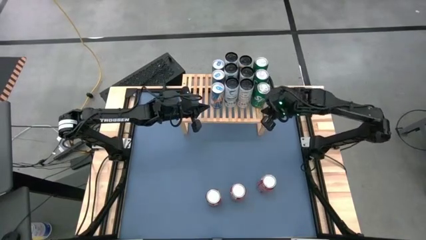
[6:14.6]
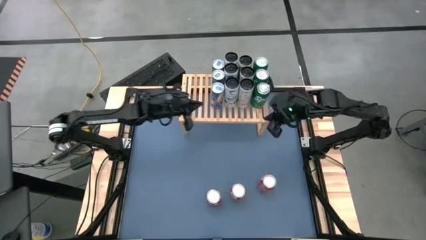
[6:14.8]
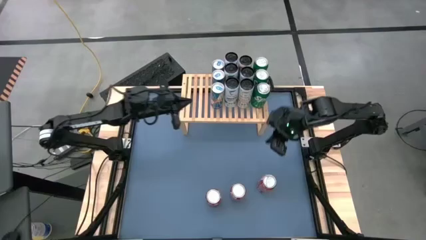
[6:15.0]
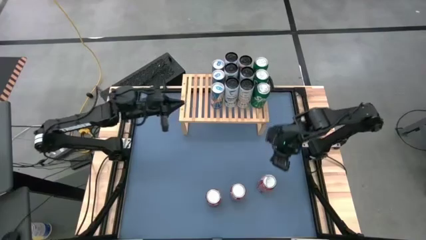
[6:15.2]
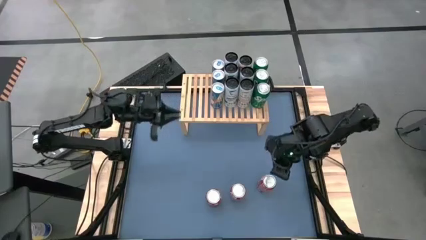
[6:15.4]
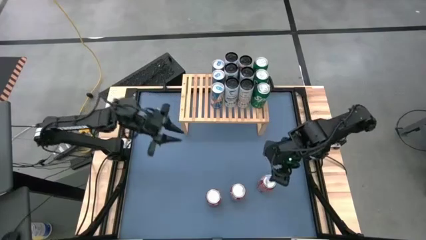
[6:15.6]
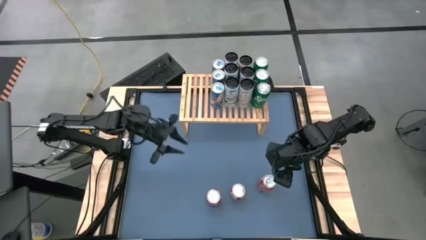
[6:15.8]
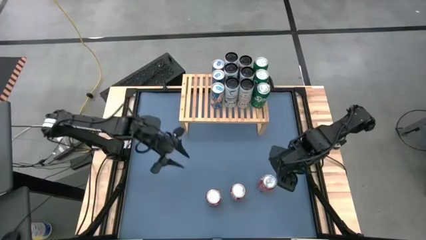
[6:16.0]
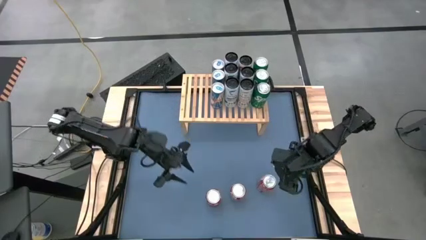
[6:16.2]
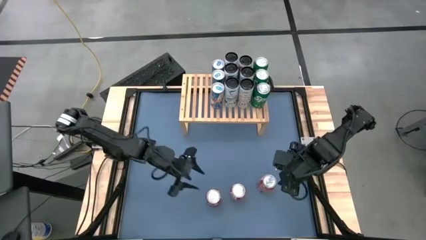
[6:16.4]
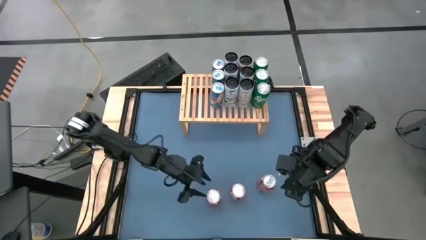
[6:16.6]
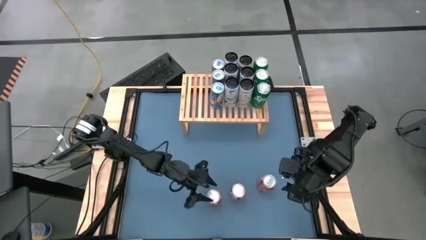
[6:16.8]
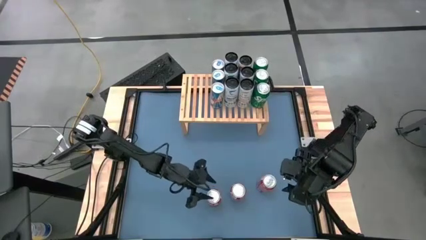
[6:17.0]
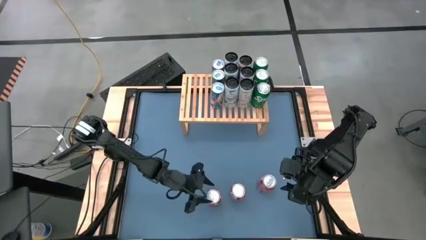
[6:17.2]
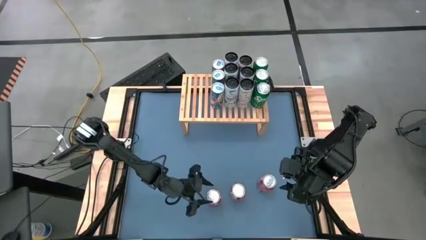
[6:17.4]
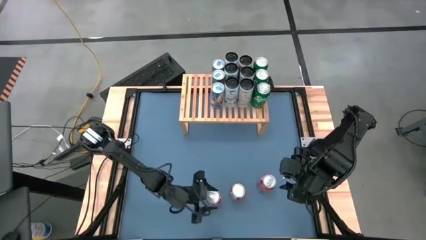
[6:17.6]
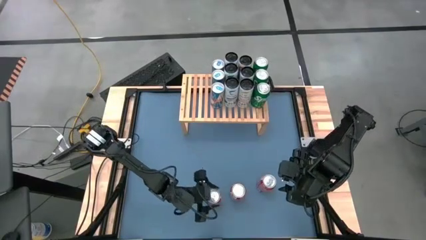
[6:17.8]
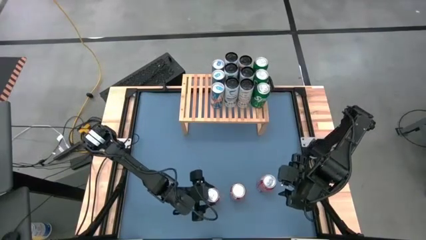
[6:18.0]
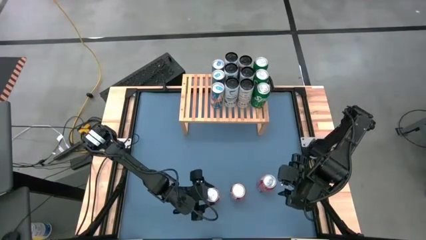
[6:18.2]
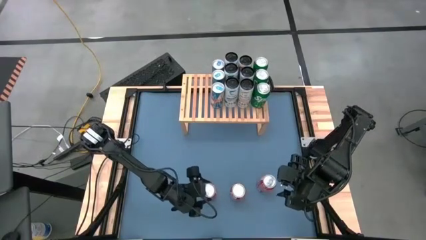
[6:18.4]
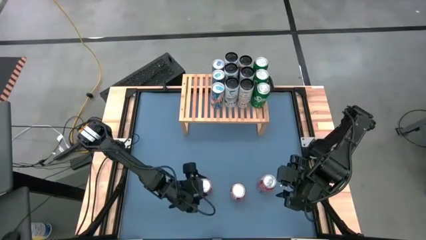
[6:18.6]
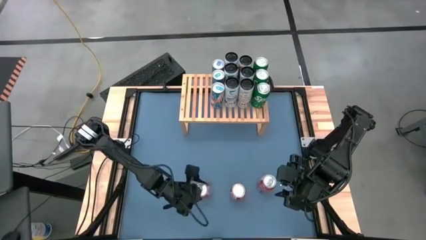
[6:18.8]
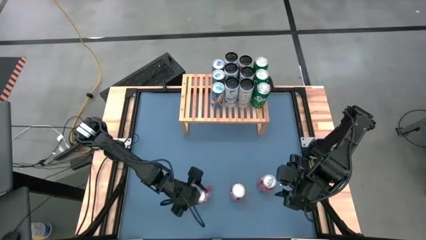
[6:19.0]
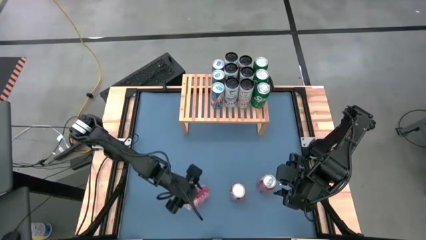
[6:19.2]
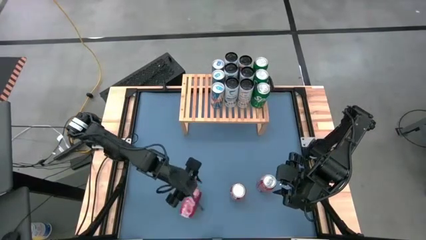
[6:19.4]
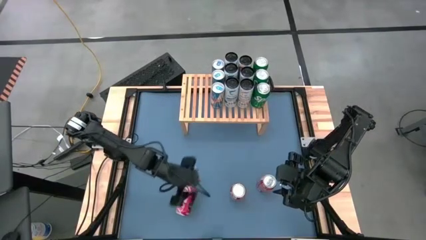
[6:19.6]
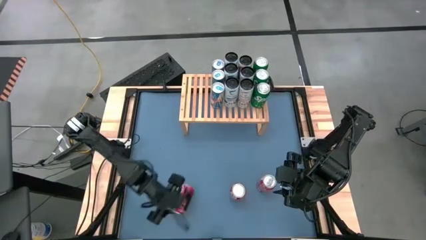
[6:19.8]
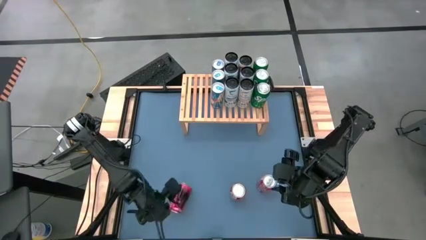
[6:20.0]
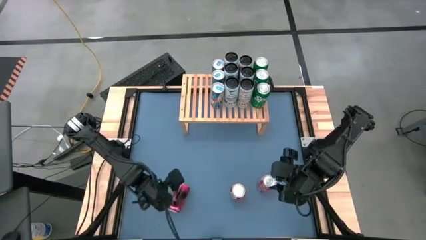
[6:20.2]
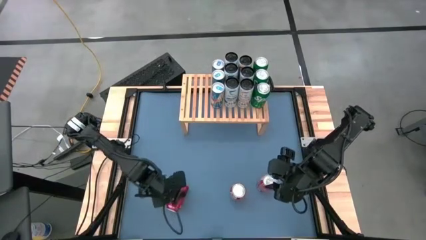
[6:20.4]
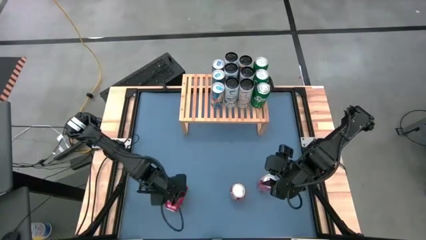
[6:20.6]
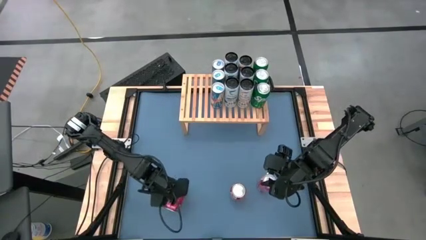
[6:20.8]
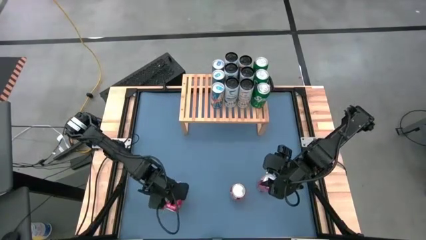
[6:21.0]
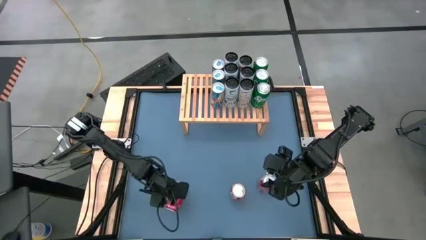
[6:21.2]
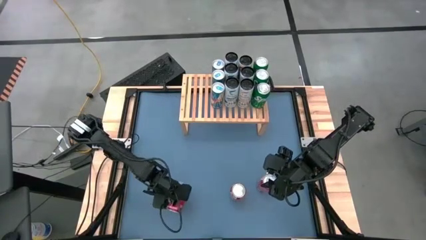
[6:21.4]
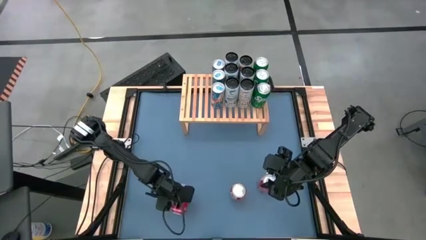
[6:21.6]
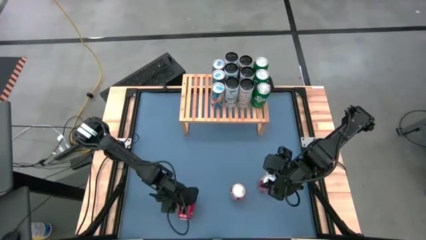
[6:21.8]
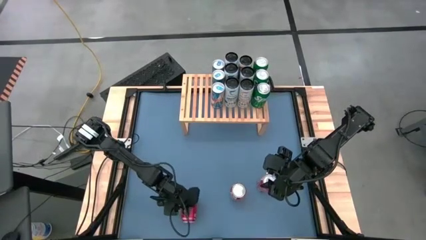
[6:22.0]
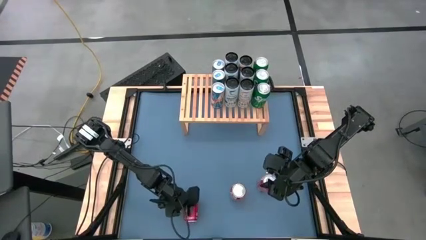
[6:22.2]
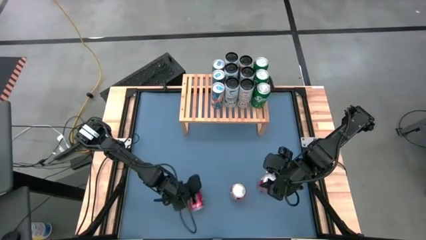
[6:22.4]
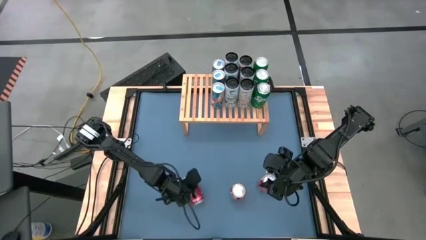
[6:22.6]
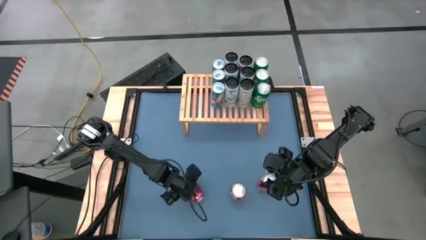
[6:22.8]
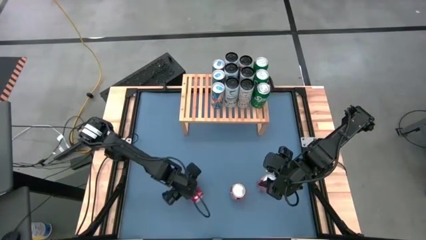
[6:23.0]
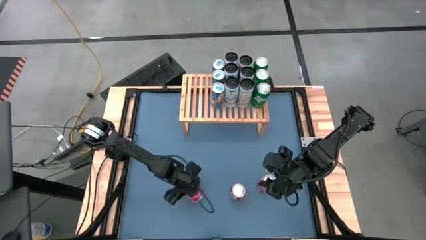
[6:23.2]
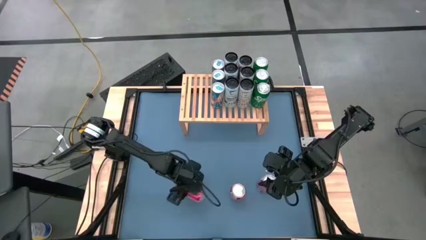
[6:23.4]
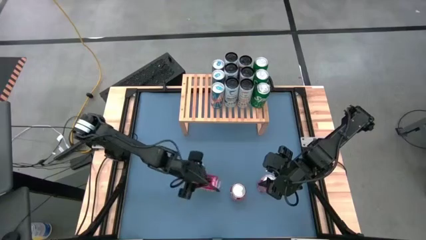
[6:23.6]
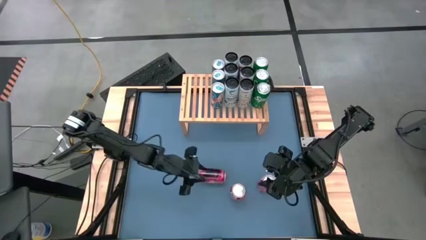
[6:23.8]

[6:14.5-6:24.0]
Task: Place canned beverage on shelf
Put the left red soda can on the shelf

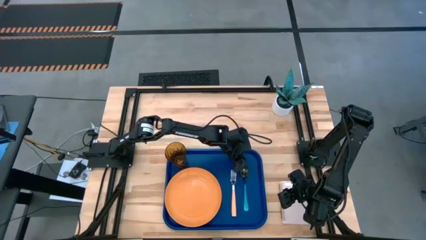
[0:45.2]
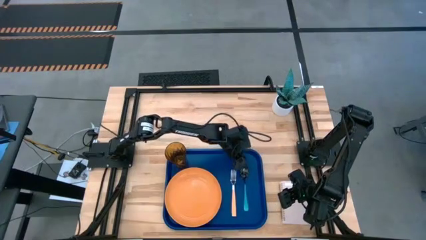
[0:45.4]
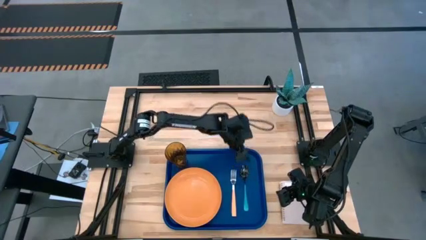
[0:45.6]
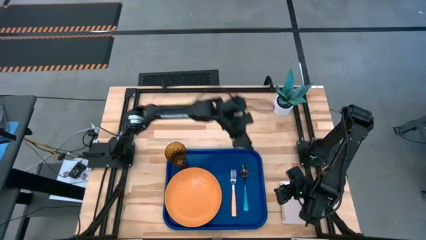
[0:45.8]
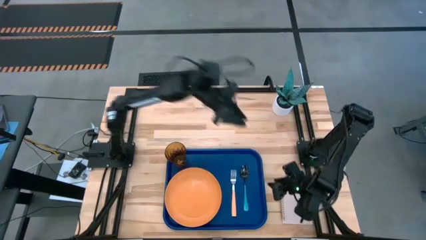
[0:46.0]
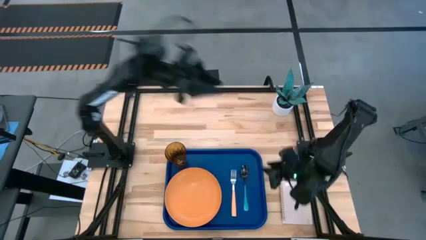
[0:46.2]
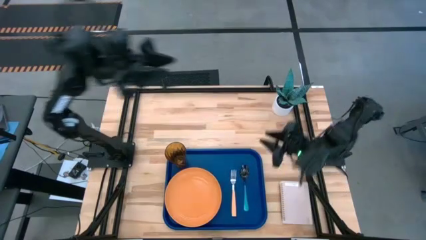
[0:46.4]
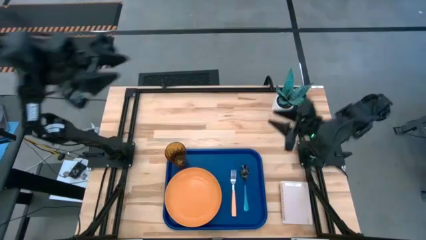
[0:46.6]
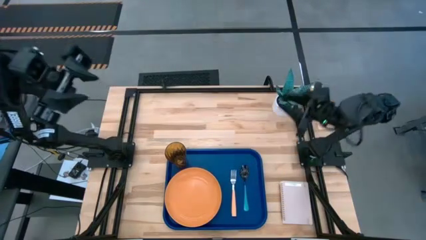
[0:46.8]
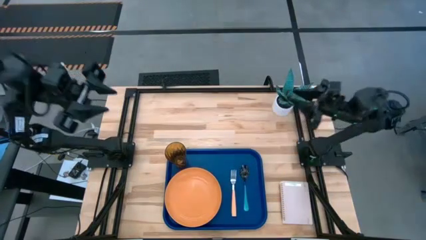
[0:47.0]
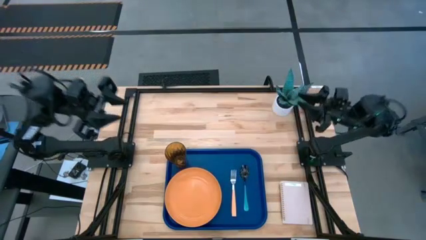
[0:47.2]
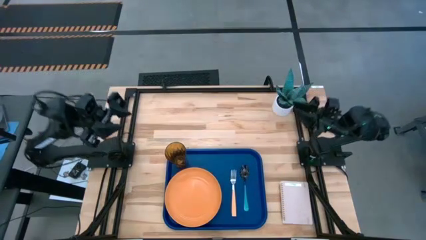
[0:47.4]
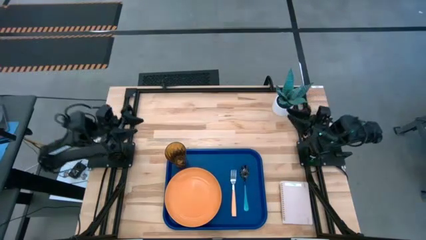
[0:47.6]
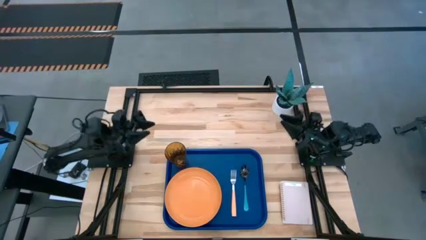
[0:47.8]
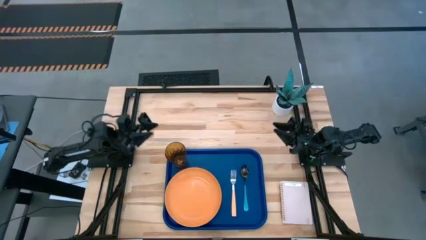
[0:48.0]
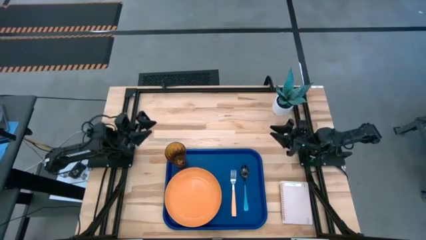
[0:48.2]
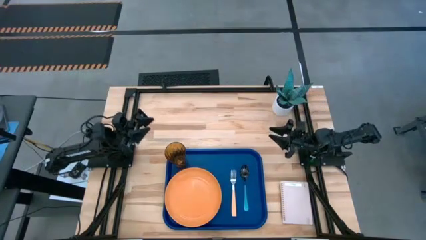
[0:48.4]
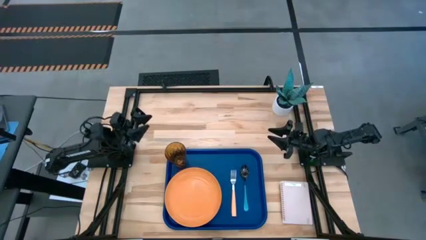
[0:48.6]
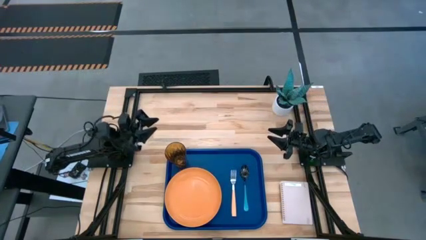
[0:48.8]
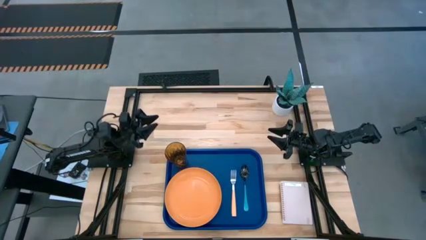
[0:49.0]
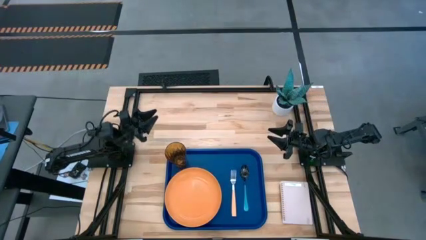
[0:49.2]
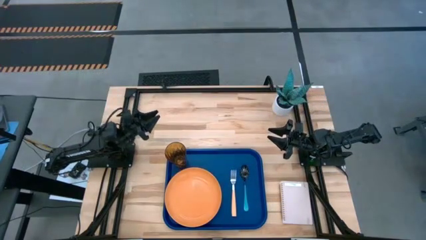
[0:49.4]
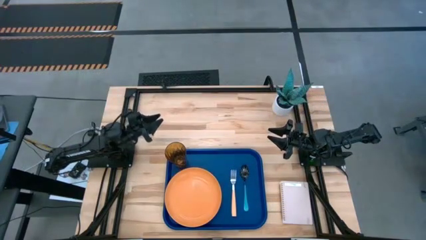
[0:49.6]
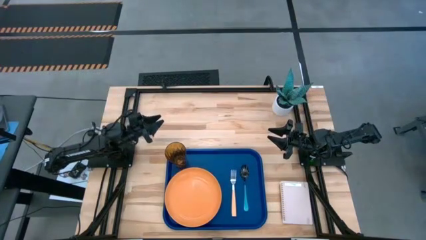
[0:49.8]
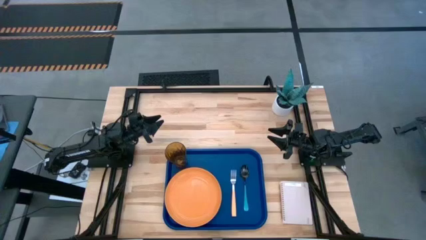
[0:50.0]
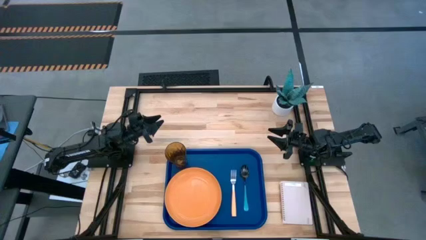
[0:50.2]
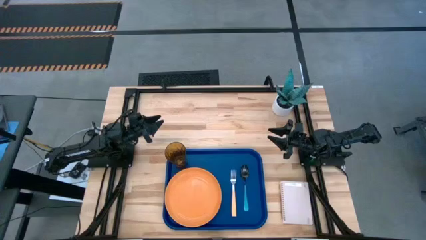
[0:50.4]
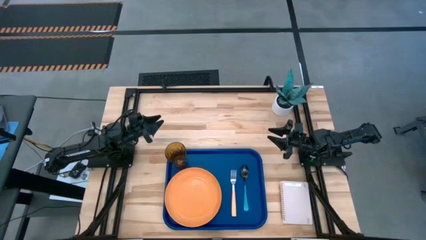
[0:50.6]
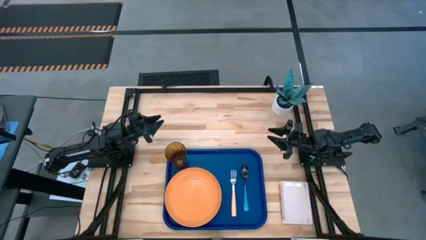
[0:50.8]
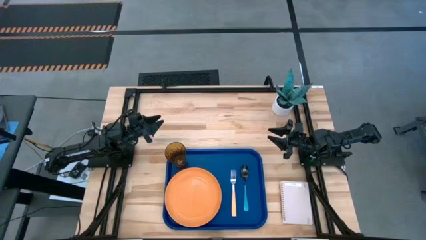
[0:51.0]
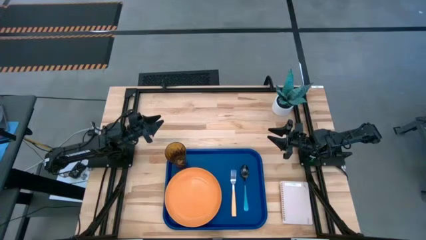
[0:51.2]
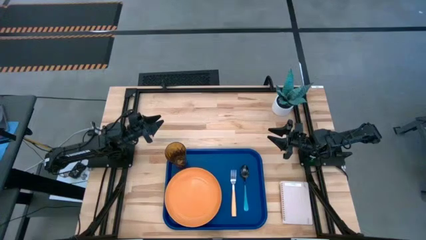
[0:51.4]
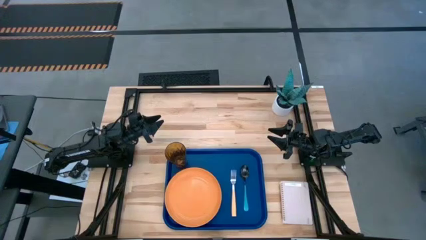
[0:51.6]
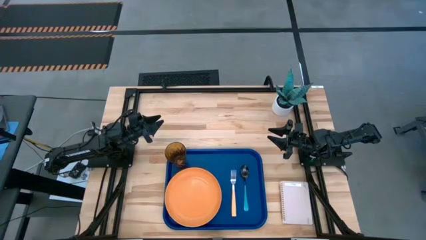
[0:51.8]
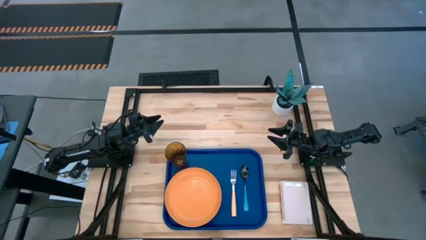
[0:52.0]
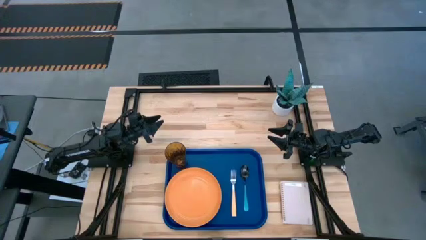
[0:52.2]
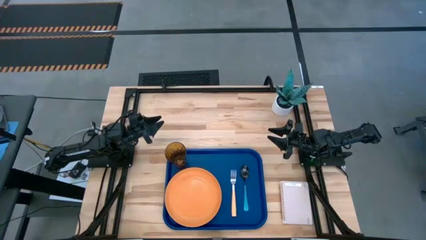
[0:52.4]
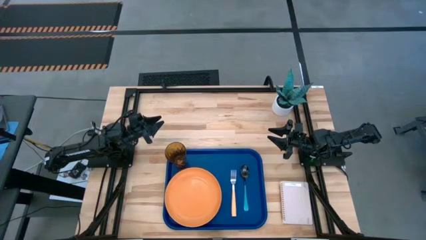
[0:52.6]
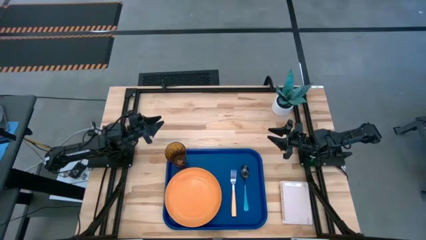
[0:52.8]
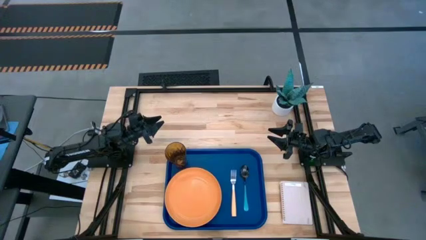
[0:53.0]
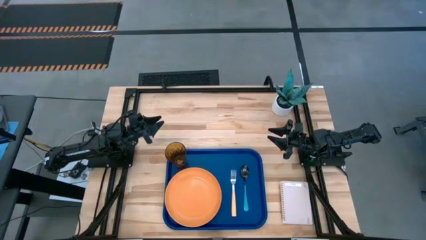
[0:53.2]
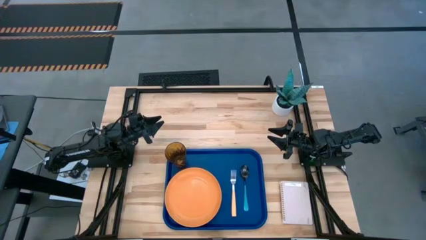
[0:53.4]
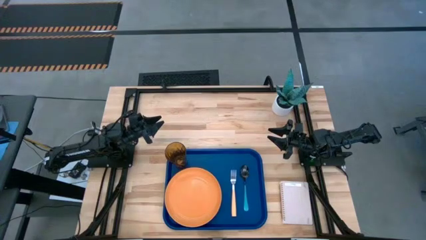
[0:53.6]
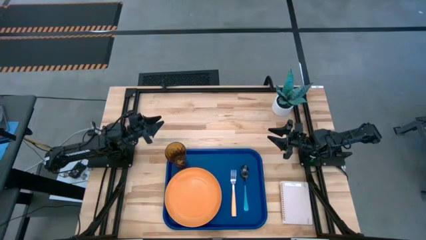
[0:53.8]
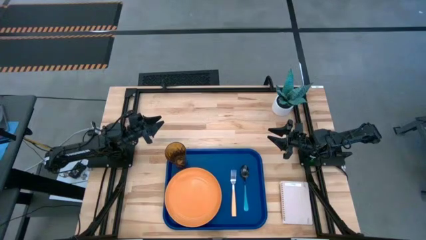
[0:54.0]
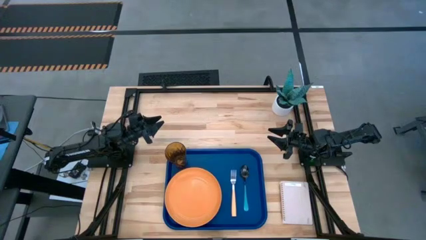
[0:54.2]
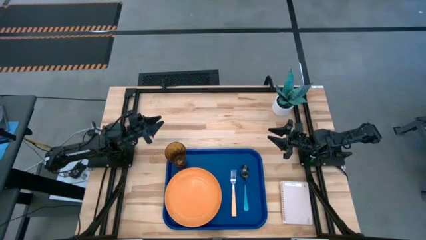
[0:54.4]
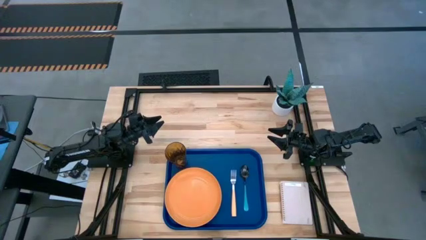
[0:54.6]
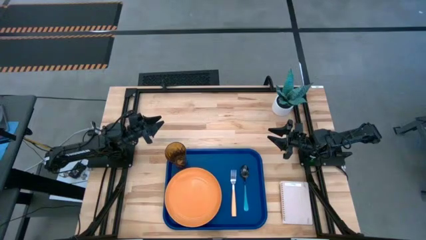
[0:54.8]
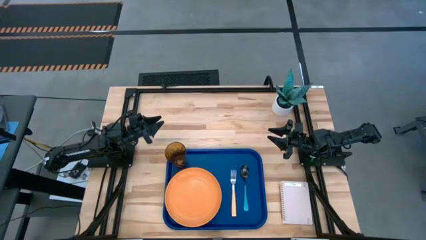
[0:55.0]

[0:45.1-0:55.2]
Task: Pick and place plate/cup/fork/spoon on tray
Return to Home Position
